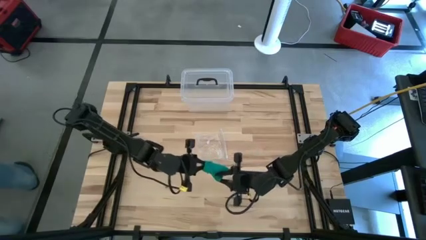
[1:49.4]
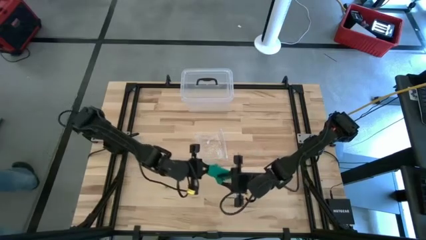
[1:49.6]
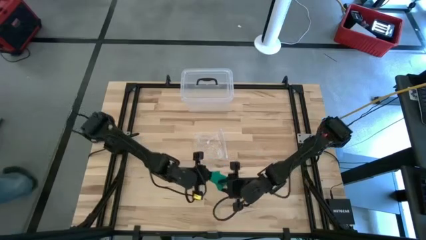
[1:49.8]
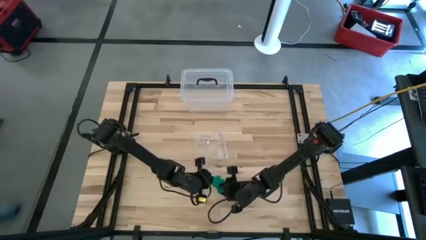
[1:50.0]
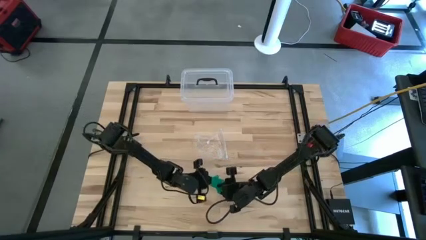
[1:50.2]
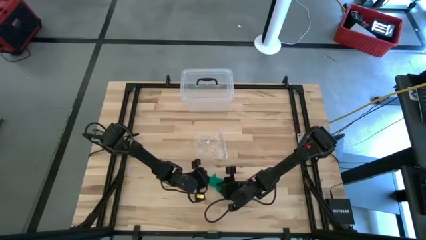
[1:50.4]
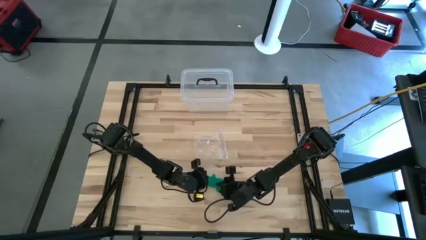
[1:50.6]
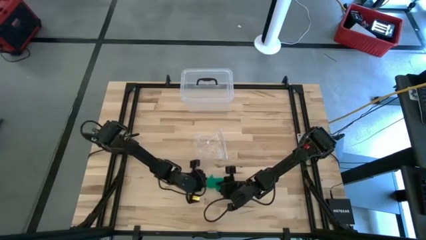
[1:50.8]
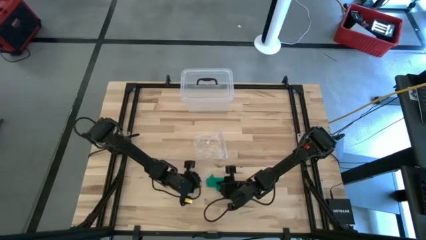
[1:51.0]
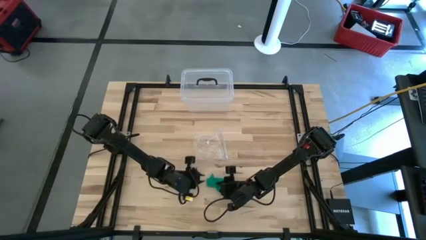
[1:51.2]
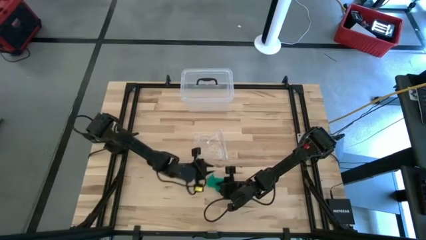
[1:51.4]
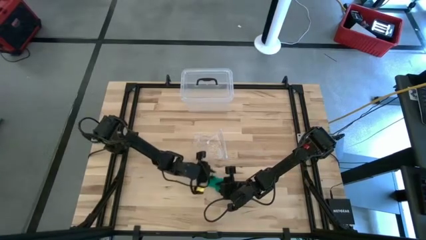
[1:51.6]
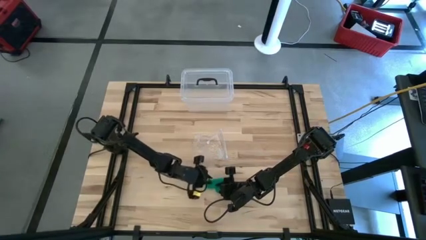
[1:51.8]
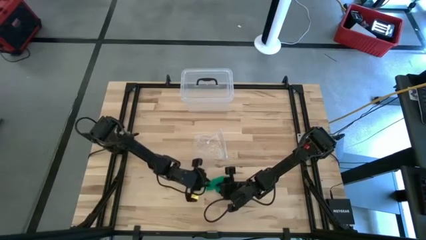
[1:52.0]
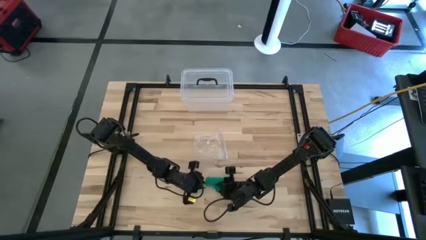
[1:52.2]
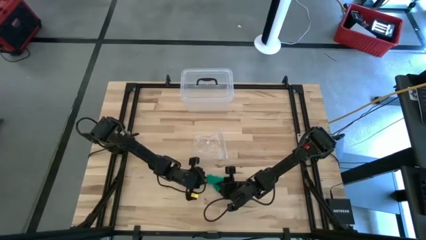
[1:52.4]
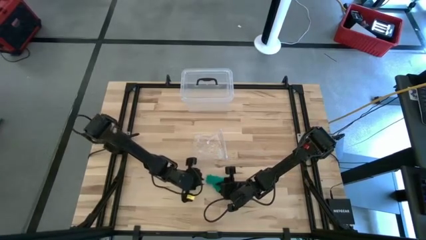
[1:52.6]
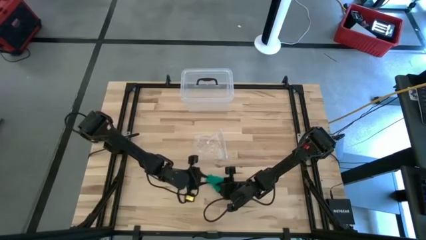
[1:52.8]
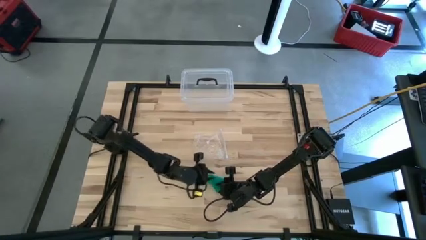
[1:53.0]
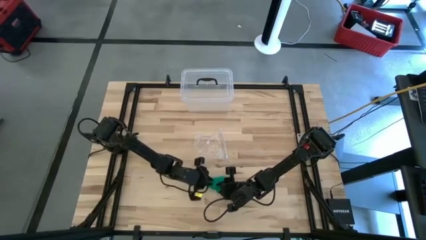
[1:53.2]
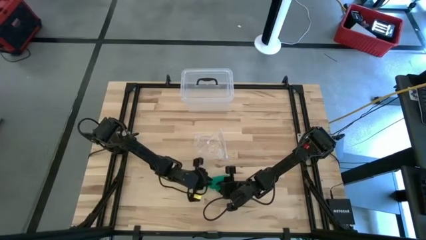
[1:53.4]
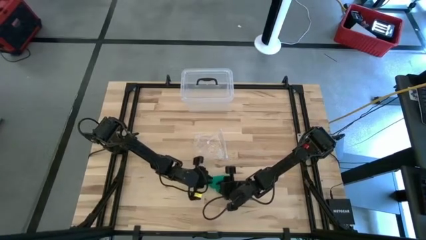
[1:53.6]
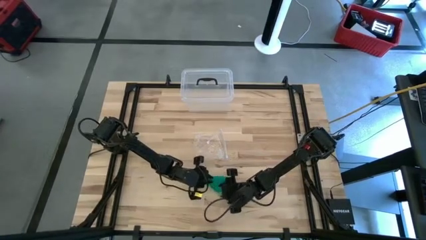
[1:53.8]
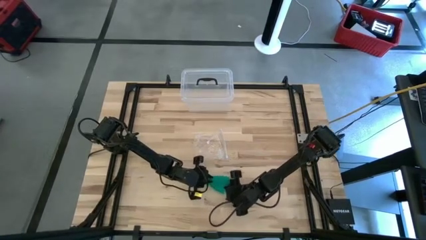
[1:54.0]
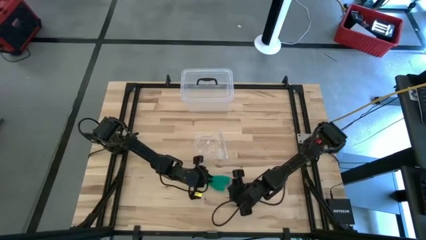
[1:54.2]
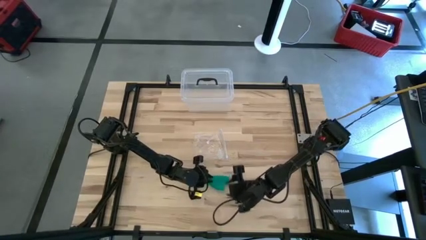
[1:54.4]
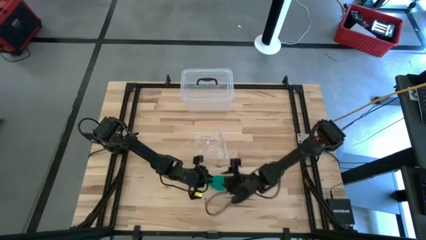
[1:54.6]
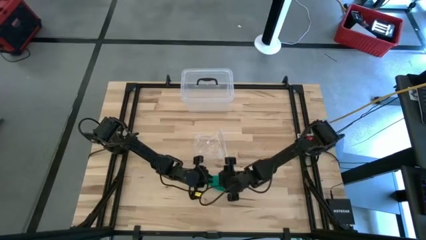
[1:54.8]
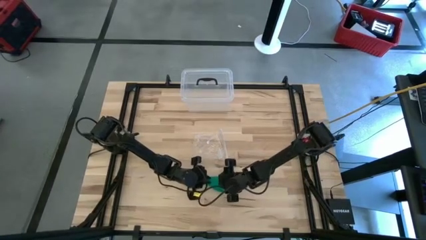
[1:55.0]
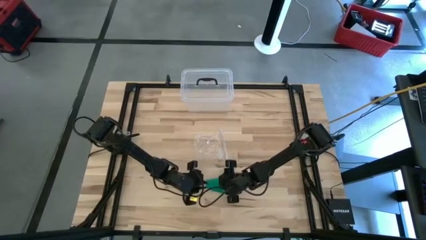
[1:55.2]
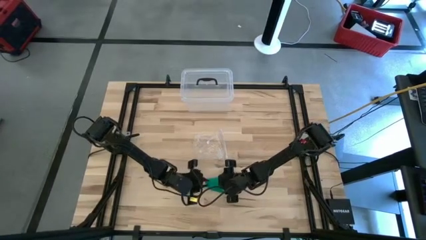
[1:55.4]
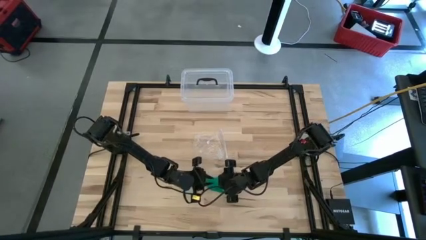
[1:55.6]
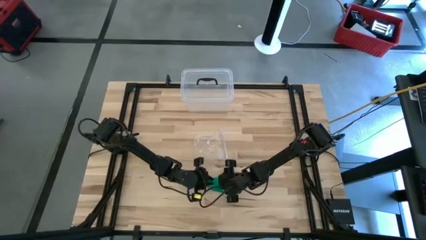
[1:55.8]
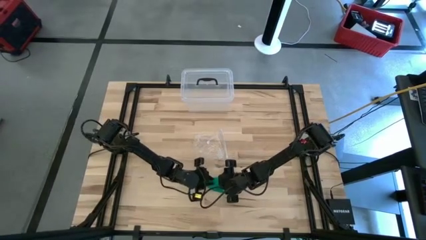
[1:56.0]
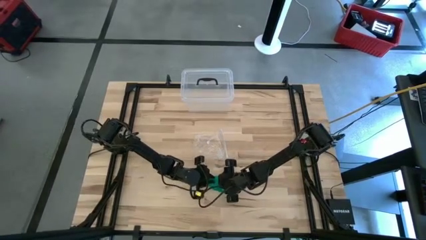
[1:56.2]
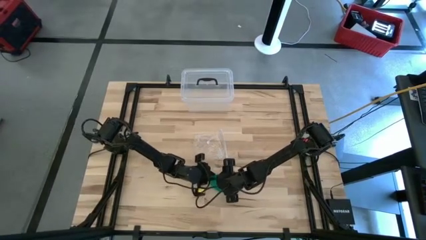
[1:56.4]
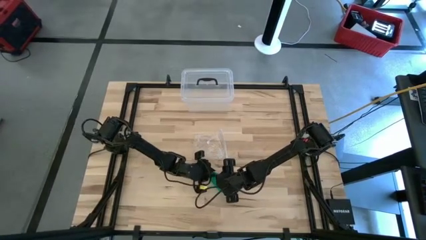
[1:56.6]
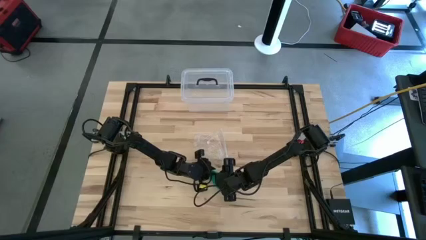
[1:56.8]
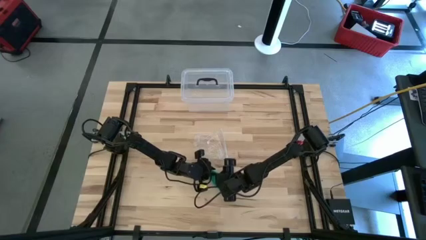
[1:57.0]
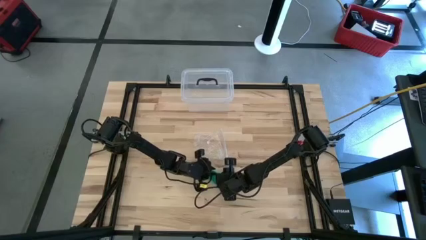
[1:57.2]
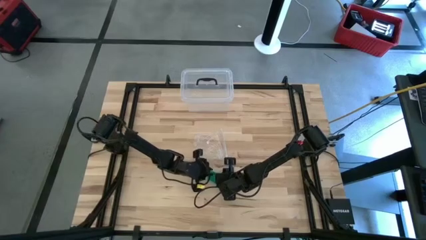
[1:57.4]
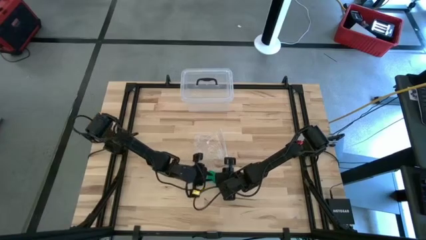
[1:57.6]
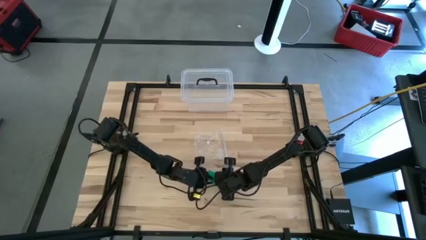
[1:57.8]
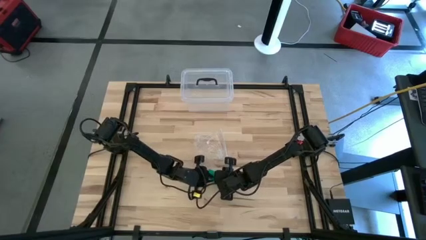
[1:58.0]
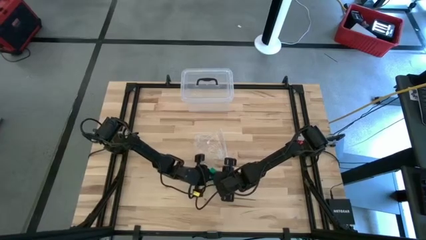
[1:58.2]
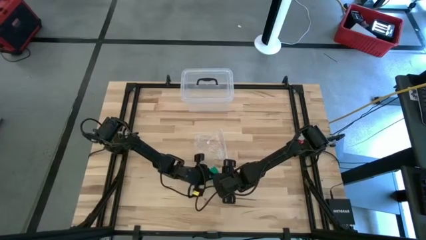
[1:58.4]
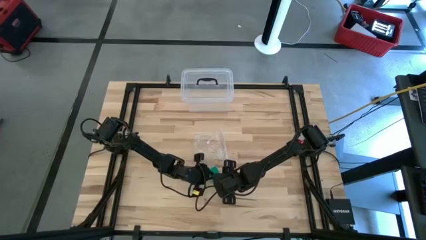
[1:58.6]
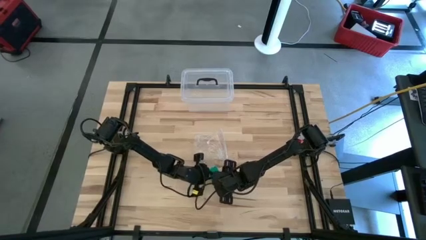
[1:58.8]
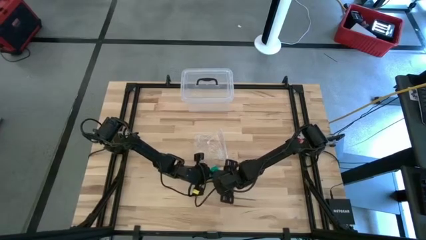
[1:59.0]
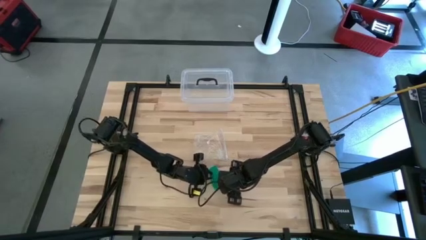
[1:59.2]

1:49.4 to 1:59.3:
Task: Roll bandage
Roll the green bandage

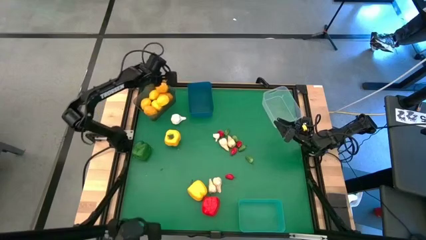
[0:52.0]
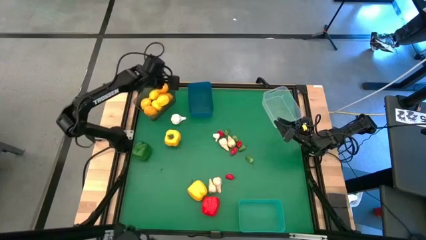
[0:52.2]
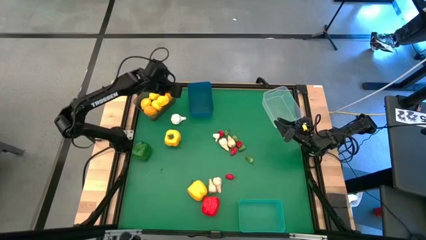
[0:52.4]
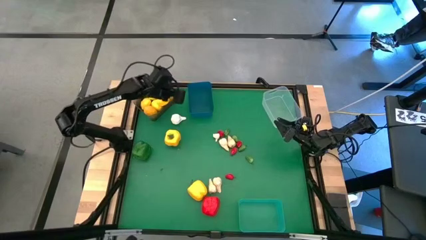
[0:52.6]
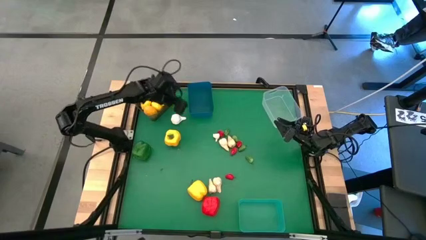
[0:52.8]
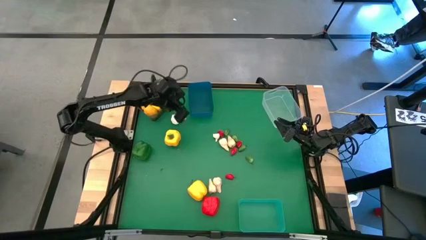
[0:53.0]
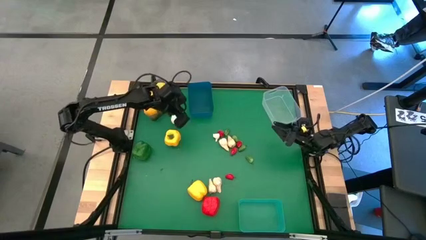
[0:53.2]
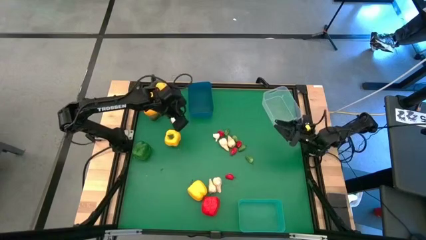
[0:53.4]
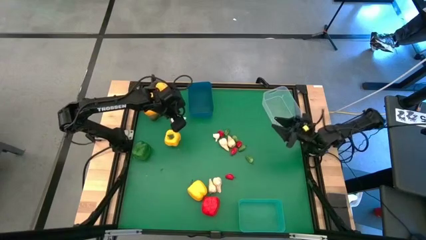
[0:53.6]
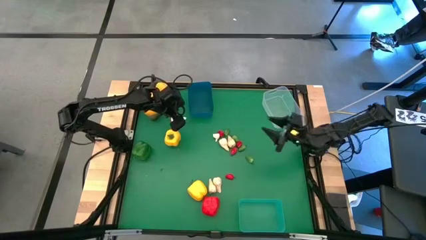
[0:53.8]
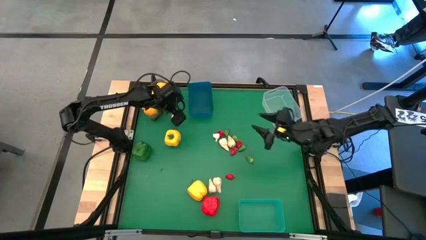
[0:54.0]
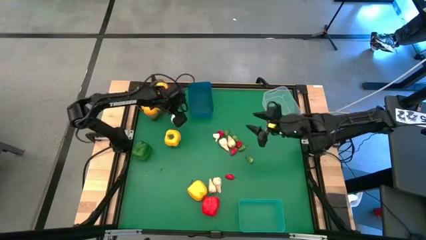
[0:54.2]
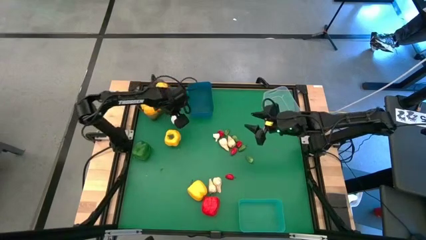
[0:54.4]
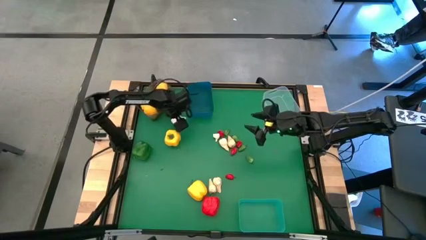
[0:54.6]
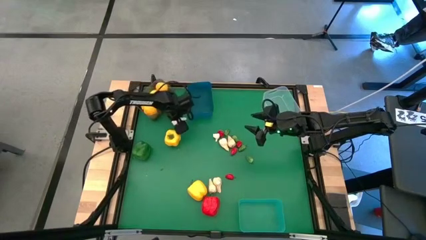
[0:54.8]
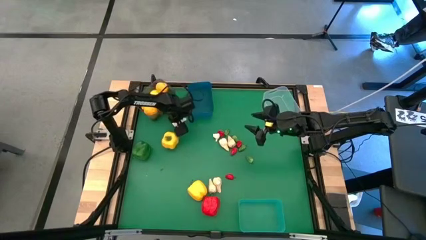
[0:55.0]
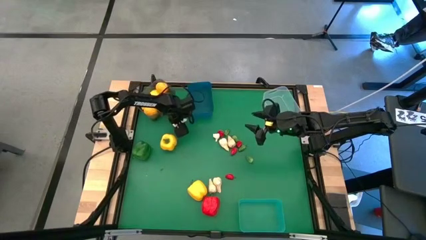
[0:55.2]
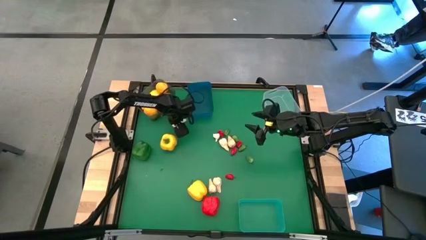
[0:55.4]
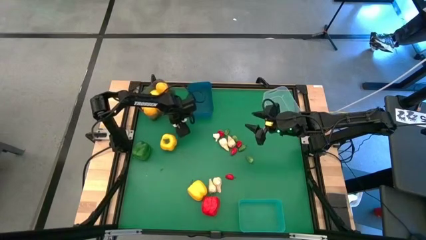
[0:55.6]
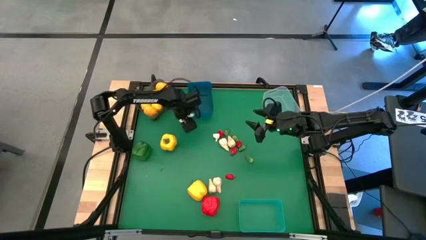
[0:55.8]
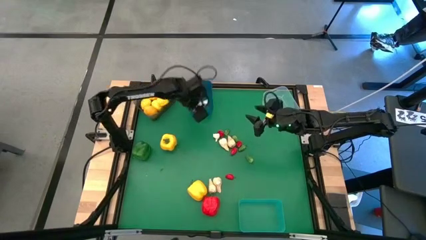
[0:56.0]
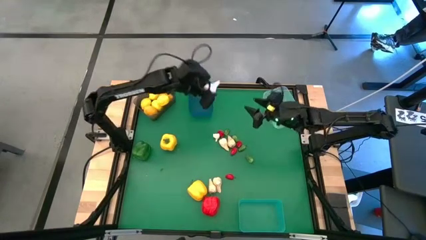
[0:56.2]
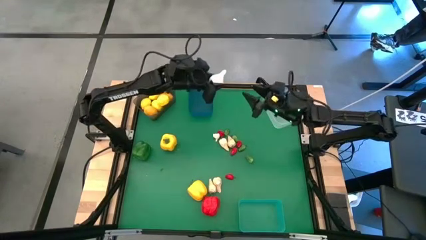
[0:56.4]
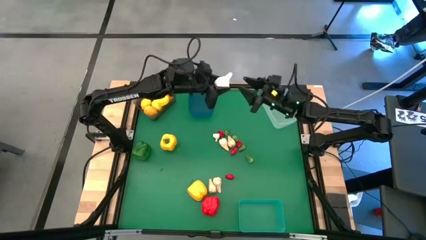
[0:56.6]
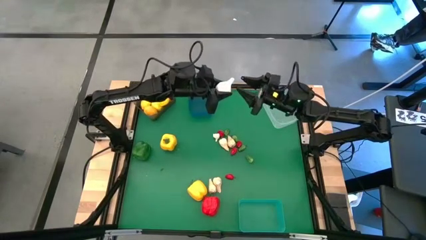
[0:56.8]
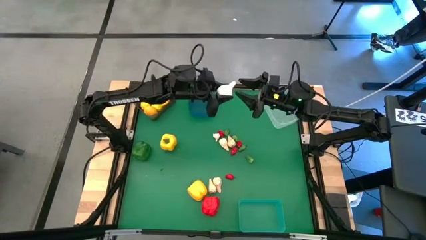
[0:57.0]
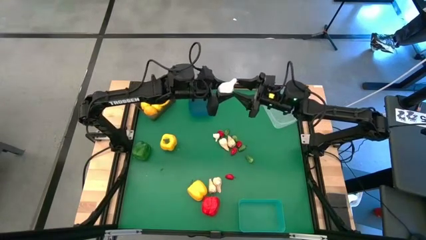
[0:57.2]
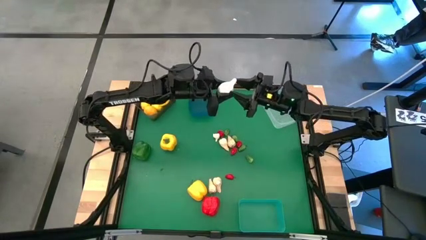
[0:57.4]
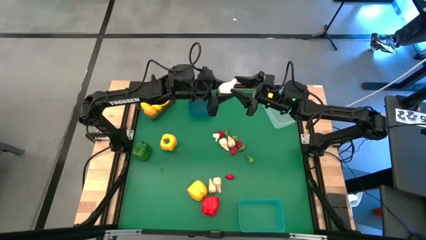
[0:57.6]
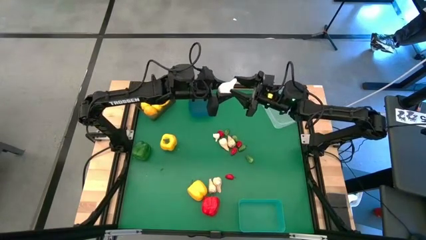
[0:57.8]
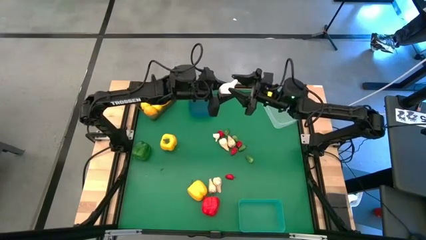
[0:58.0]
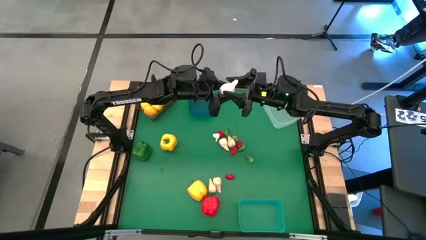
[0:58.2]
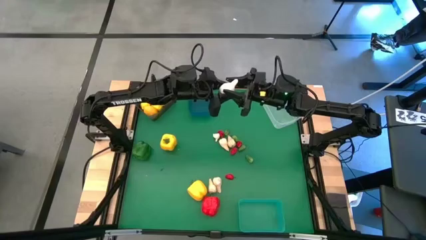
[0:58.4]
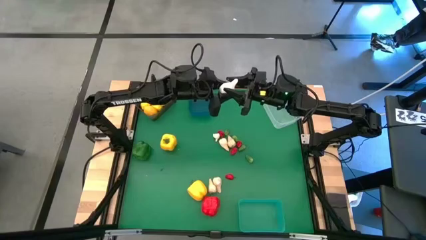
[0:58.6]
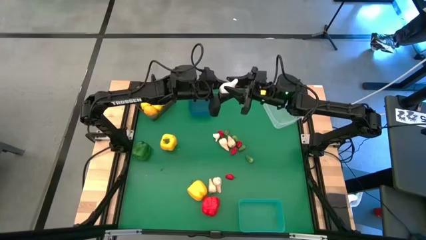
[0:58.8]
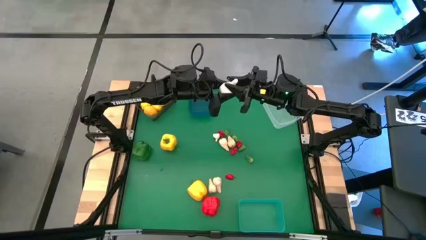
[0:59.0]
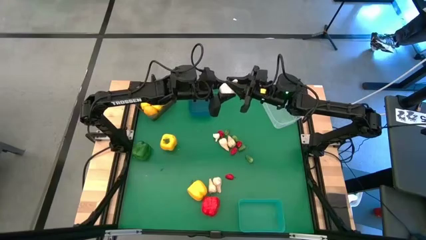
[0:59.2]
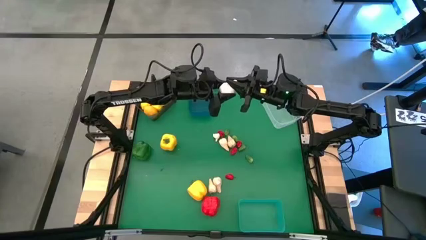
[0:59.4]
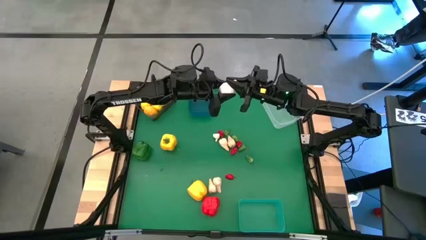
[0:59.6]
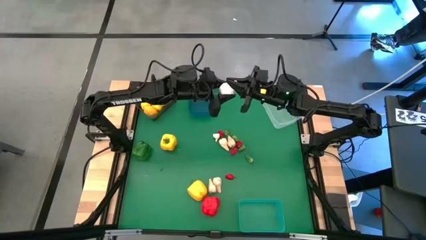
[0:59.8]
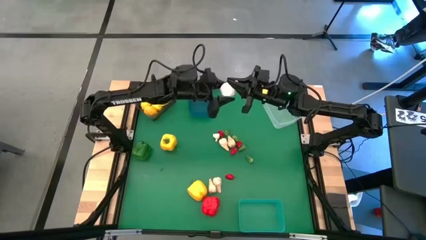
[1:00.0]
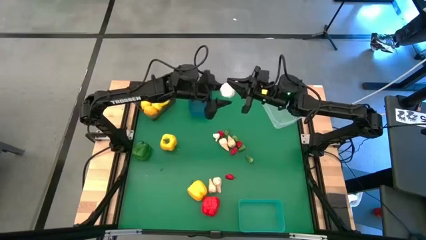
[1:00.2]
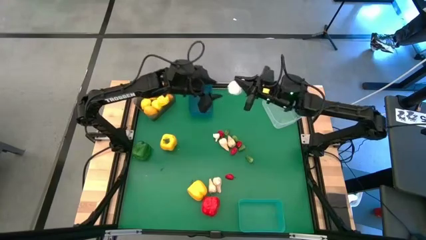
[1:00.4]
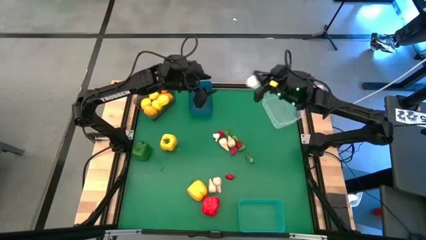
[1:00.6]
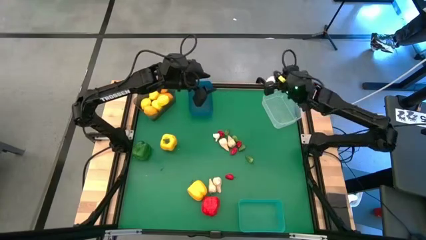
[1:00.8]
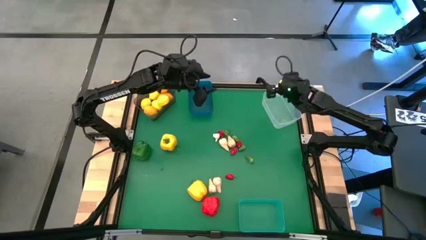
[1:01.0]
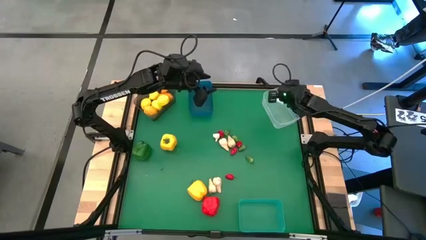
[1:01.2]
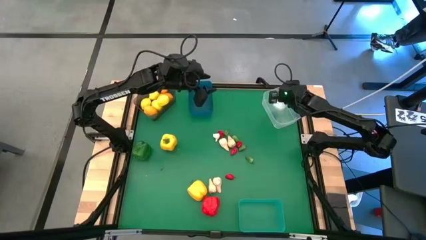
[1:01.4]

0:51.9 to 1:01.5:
Task: Sort produce into baskets
Put the white garlic into the white transparent bin
